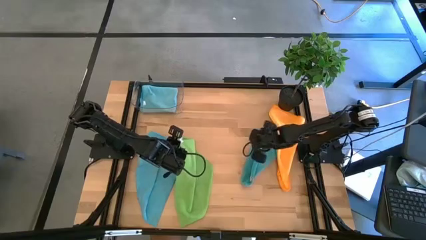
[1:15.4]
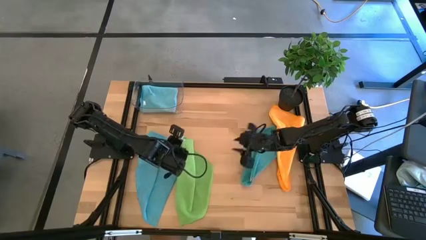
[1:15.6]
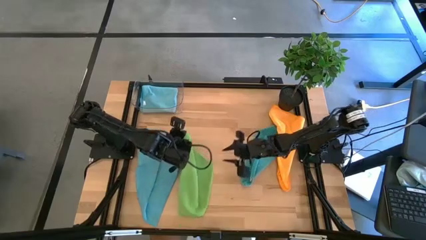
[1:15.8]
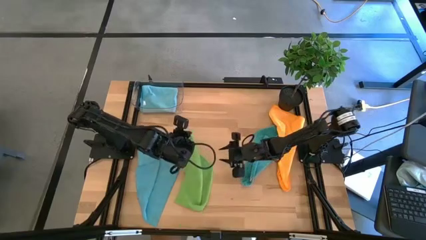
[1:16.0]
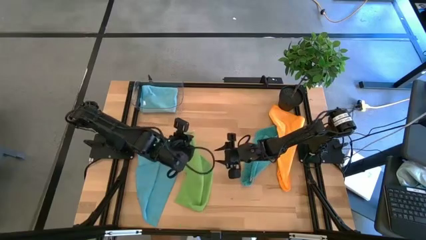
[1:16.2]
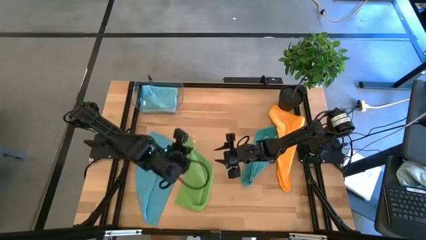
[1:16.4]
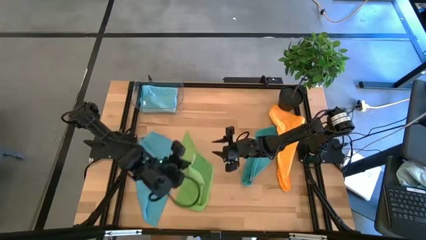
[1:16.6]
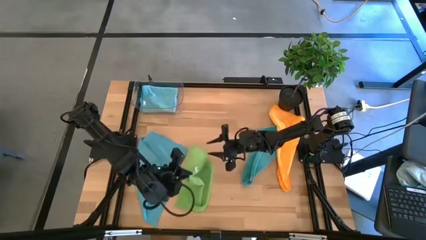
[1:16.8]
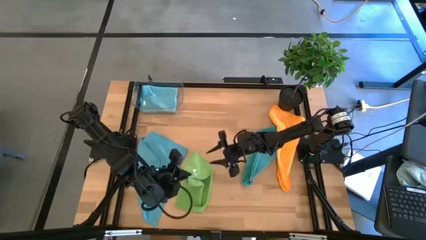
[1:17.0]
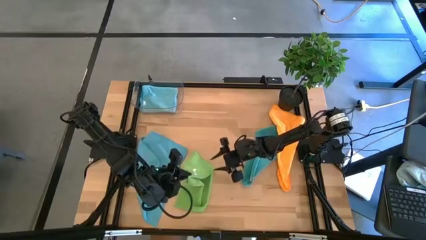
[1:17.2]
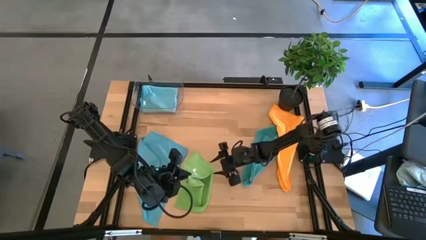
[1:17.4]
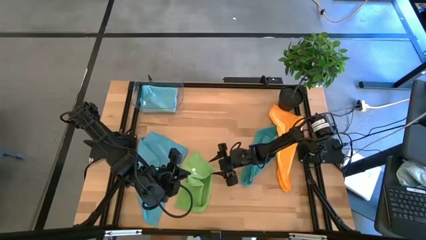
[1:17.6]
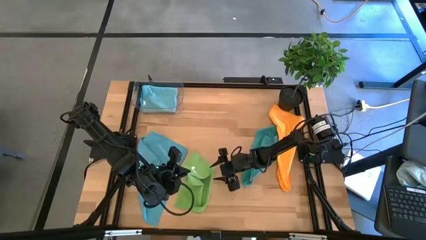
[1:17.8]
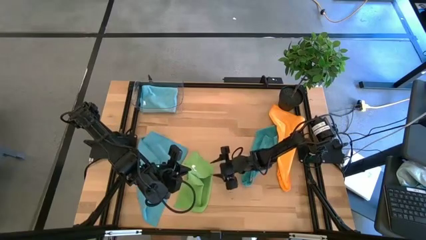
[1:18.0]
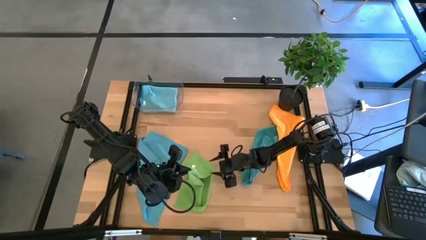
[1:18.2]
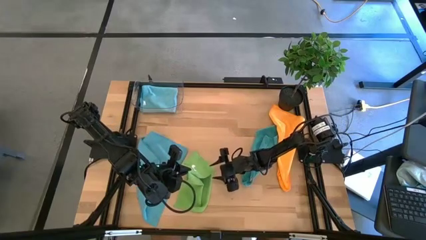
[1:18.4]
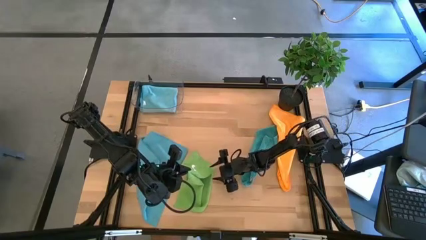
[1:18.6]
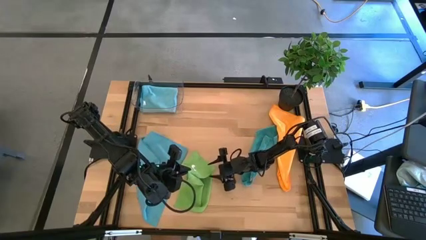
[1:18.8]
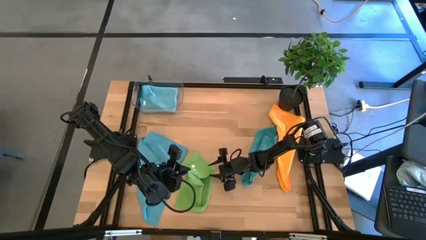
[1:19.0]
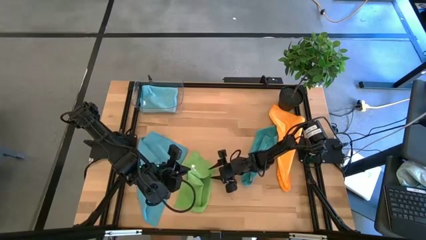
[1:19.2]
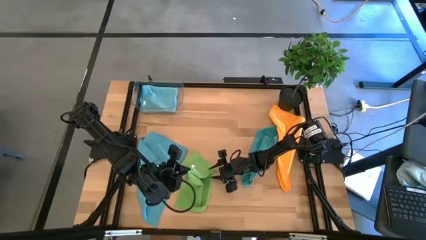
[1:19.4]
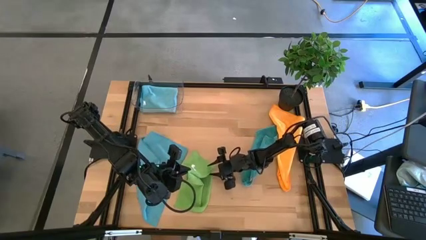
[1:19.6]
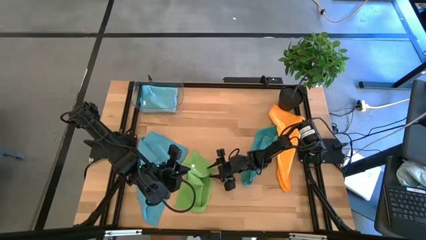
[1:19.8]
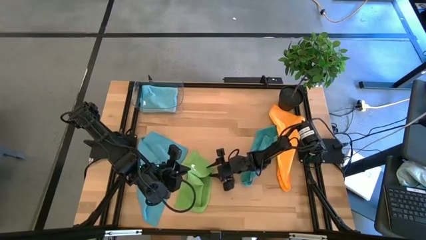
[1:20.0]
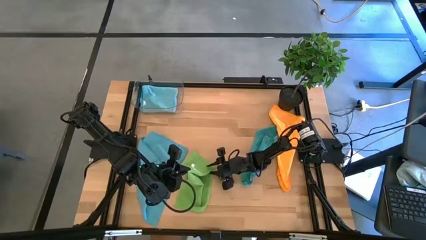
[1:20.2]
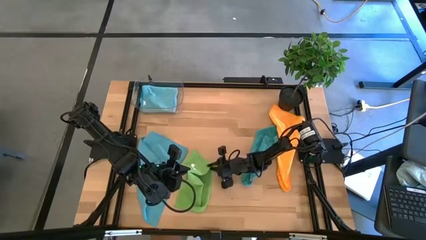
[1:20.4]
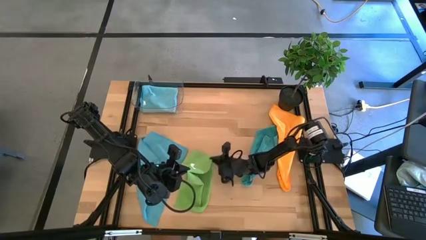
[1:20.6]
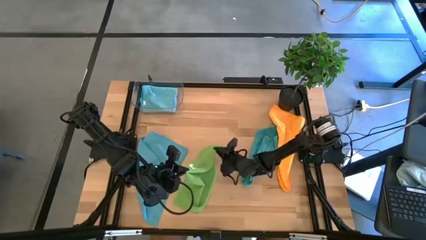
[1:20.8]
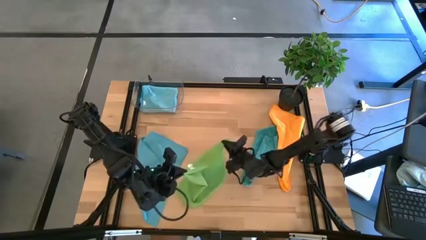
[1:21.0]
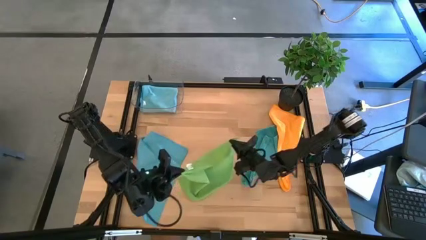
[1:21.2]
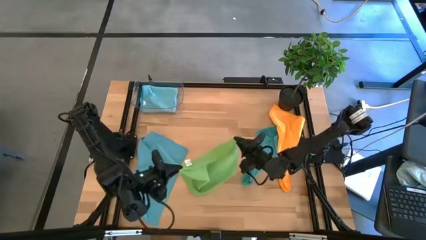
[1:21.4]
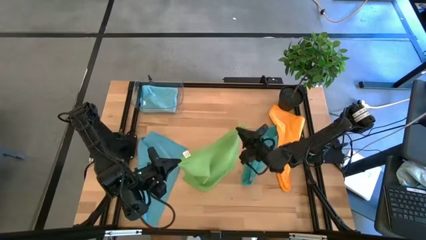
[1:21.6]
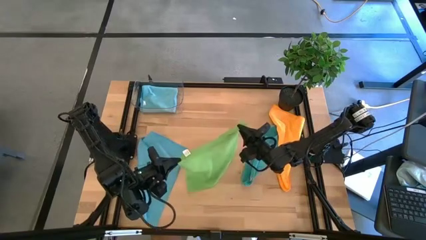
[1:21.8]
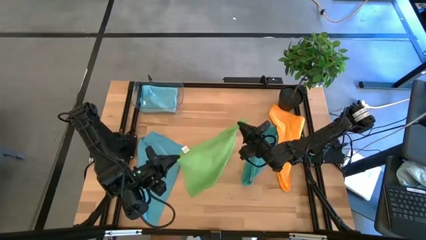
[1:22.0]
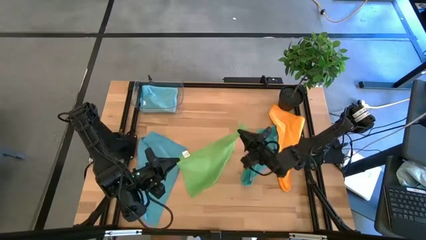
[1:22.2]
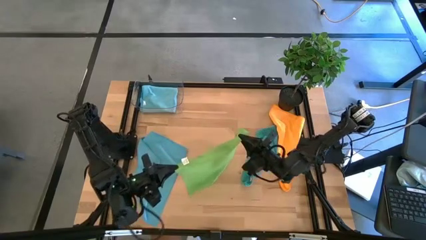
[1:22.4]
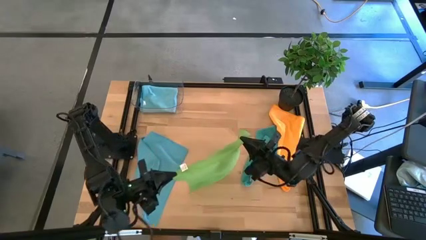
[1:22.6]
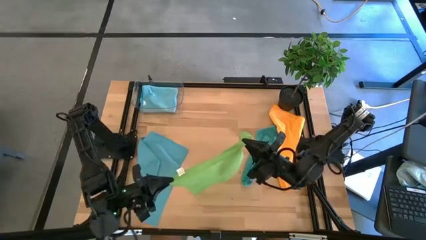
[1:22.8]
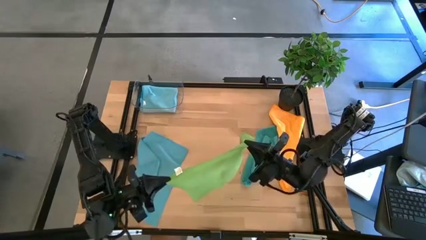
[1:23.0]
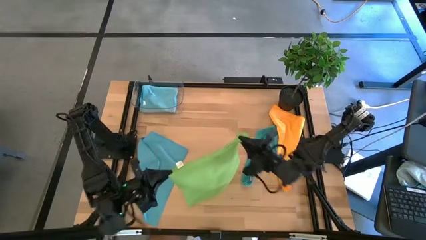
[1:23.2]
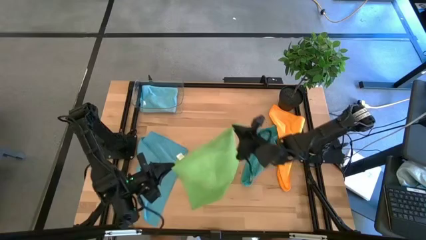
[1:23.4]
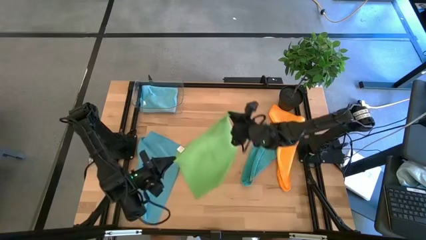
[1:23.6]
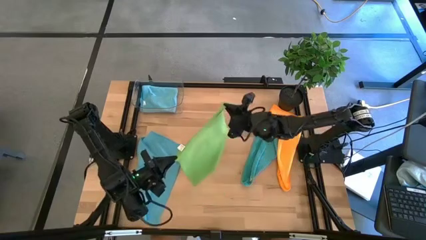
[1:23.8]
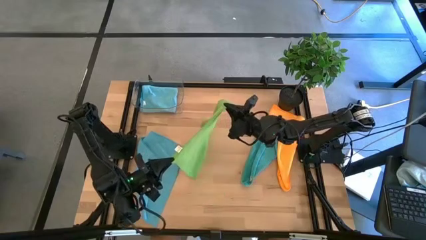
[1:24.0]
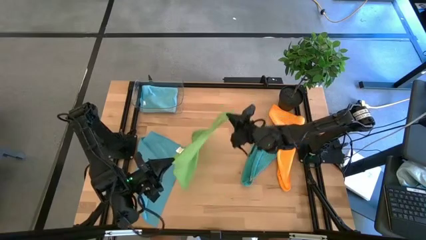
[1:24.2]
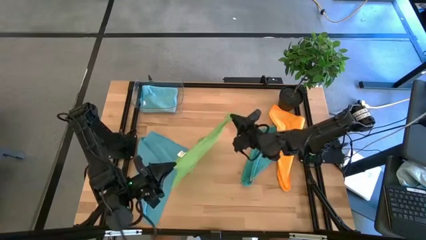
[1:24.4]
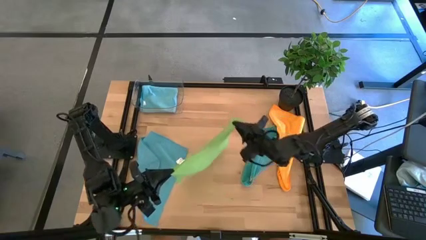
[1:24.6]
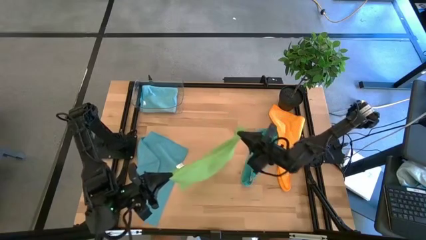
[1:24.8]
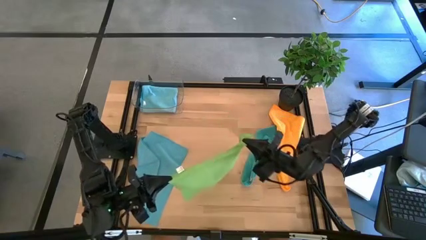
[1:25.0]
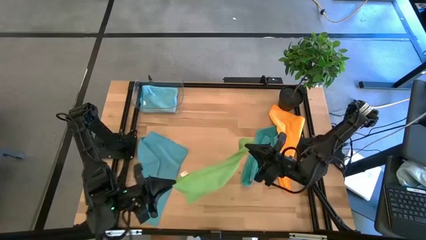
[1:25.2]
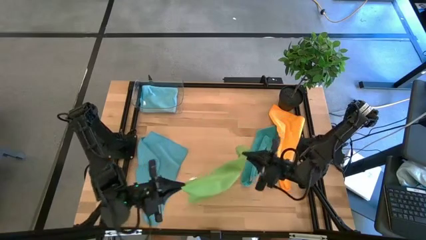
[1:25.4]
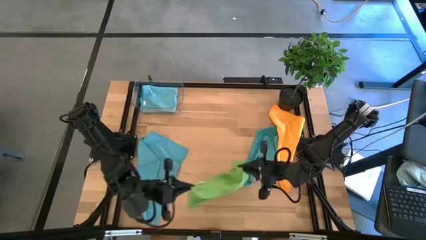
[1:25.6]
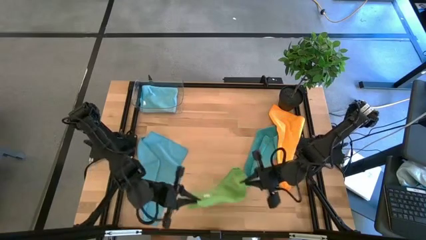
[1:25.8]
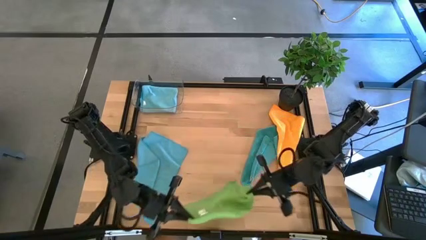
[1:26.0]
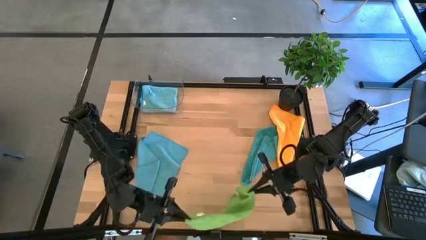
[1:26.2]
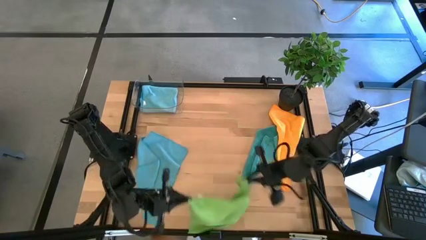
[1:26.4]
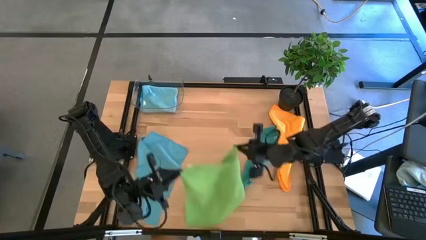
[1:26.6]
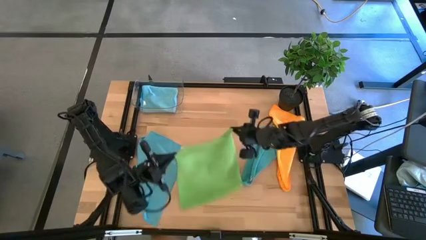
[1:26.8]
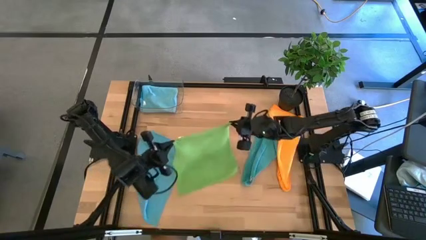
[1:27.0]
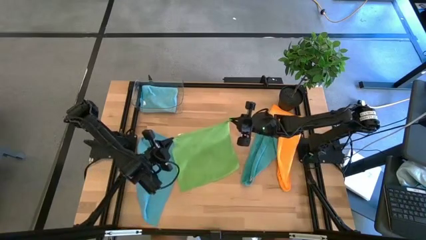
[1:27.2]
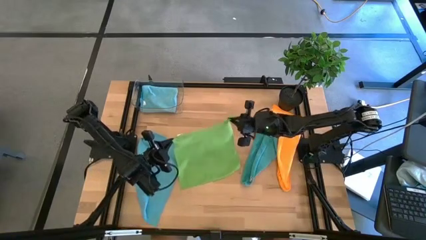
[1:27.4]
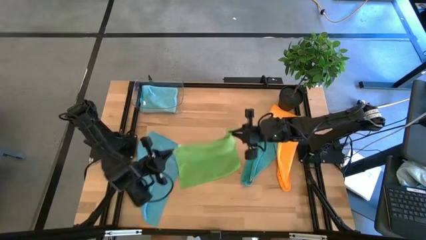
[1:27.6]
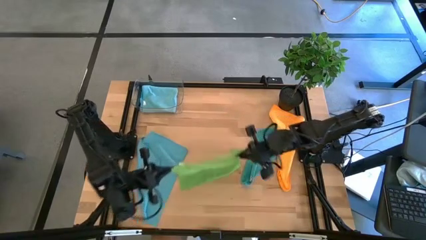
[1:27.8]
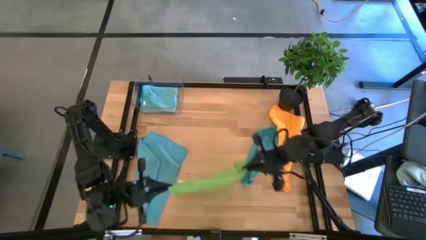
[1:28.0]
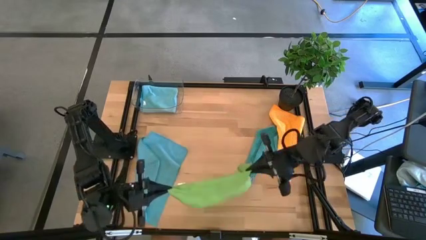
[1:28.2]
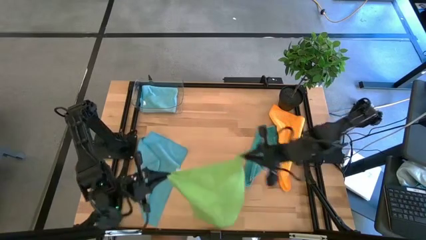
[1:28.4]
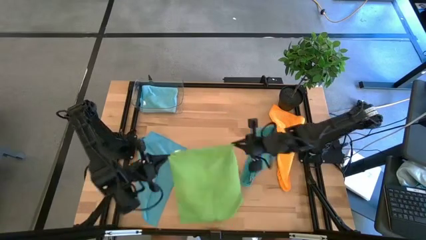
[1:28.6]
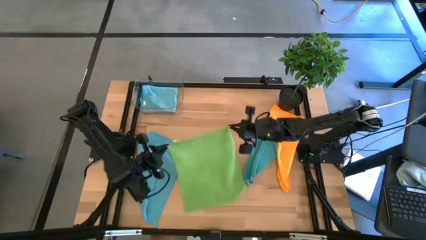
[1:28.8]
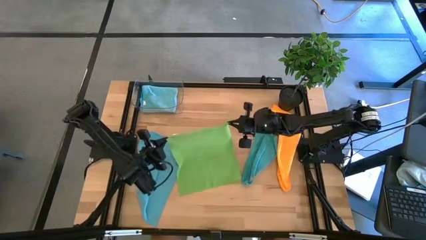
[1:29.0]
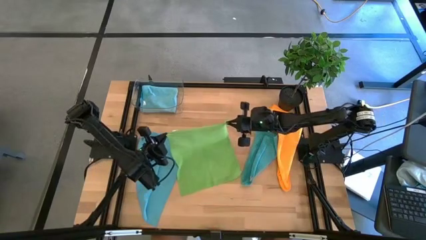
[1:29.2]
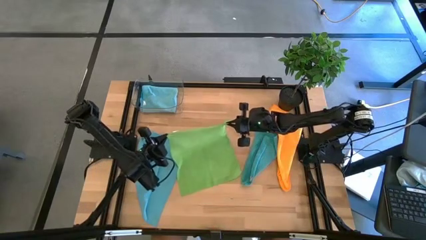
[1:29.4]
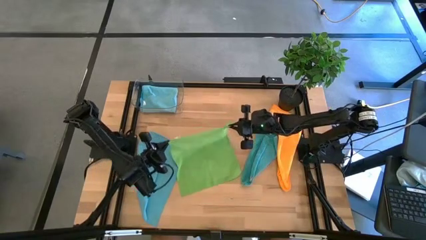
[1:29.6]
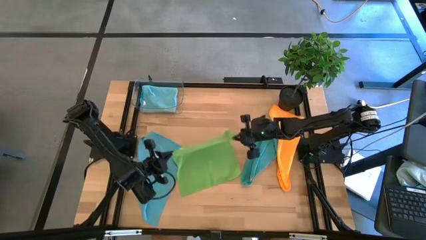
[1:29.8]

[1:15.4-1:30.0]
Task: Fold microfiber towels
Fold the green microfiber cloth
